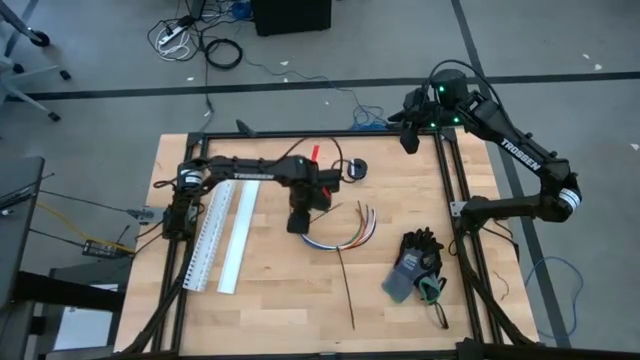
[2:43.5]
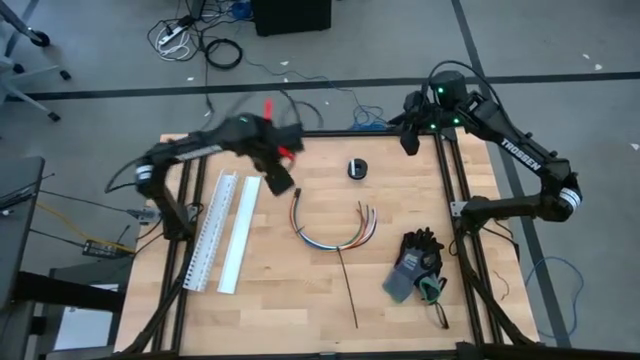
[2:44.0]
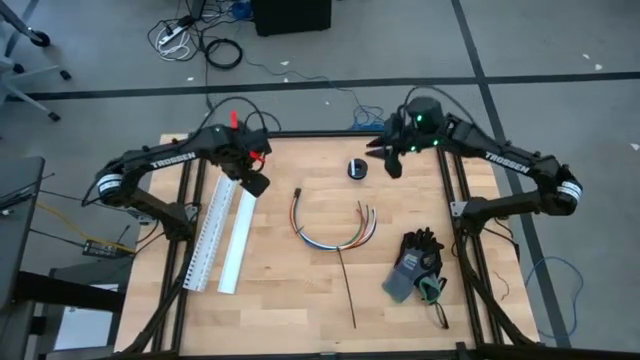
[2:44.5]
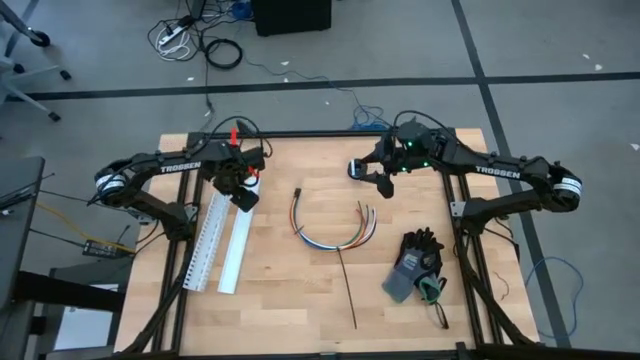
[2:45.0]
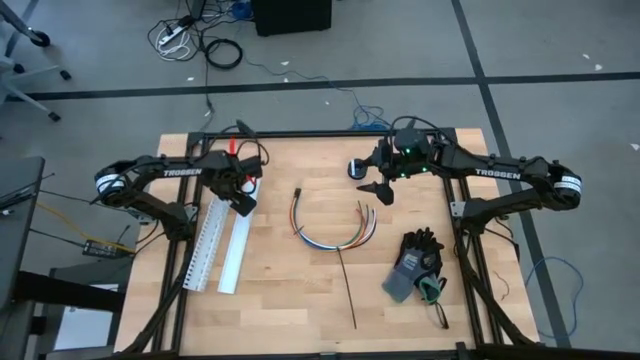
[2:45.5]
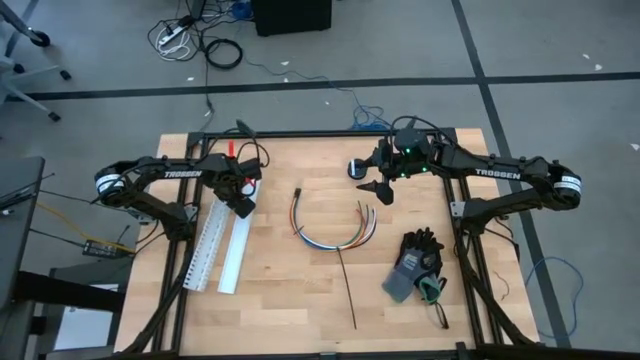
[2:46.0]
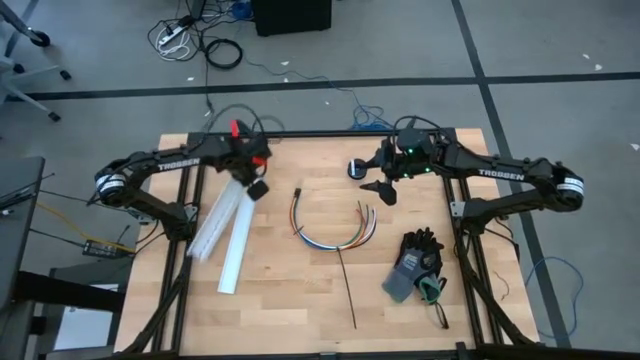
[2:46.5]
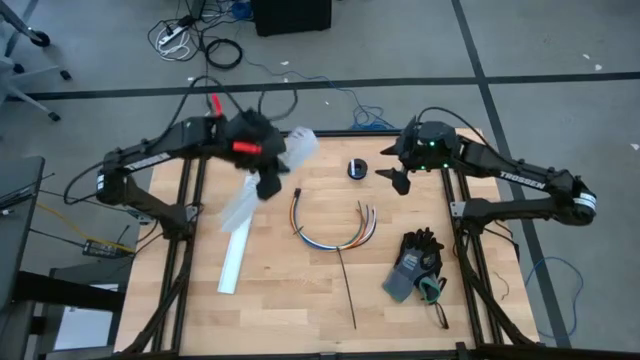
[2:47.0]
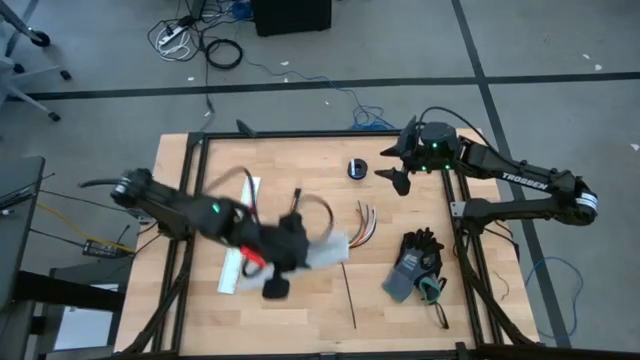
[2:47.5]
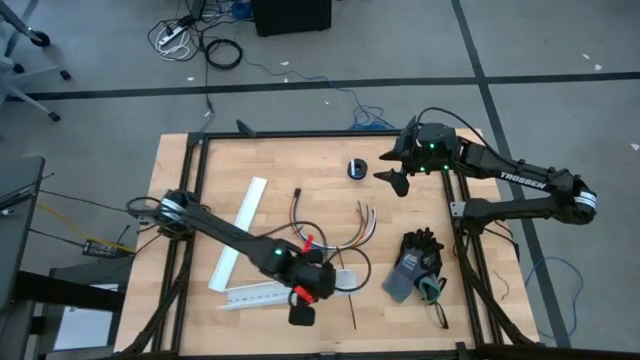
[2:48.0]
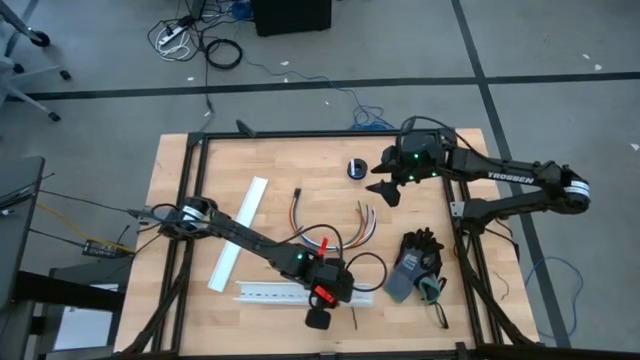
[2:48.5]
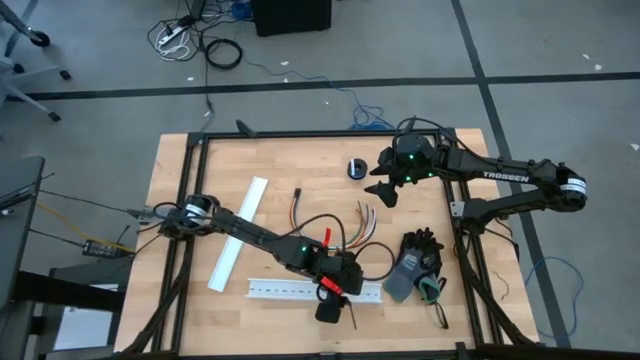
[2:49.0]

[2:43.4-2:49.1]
Task: Ziptie cables
Move the white cable duct to the bottom center of the table

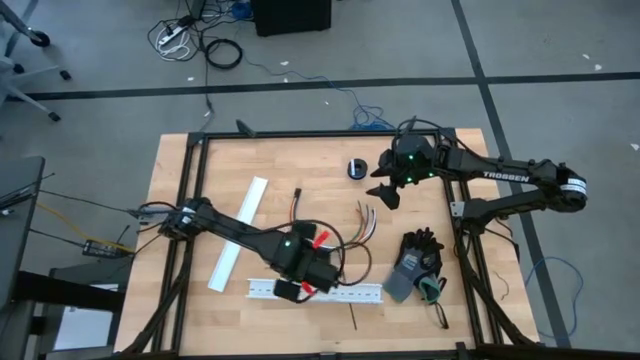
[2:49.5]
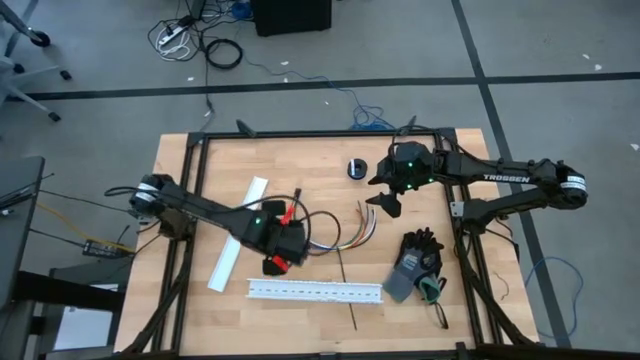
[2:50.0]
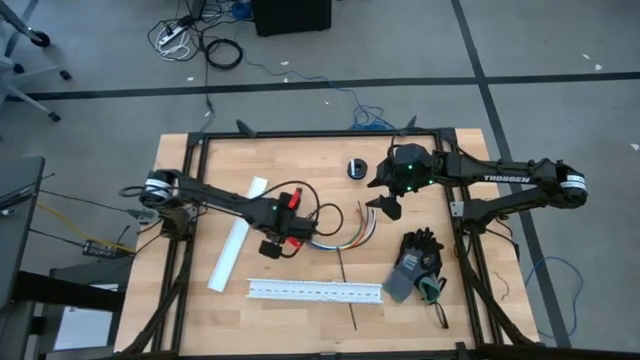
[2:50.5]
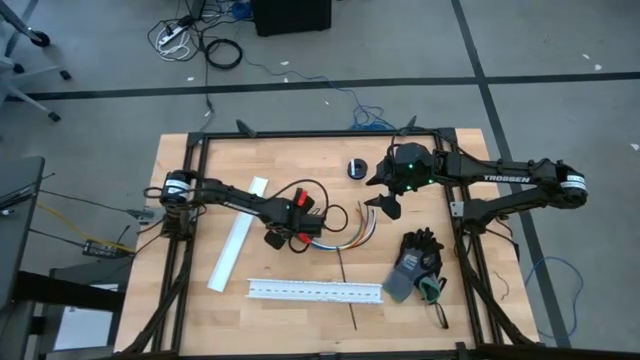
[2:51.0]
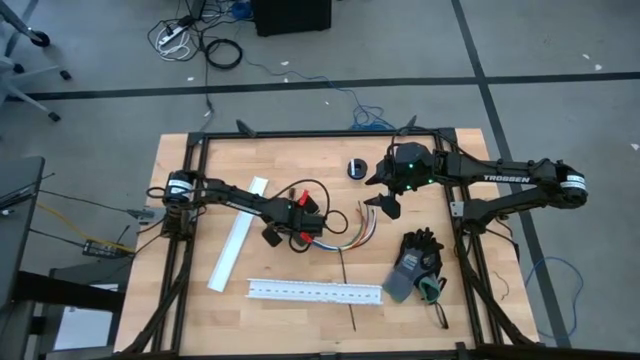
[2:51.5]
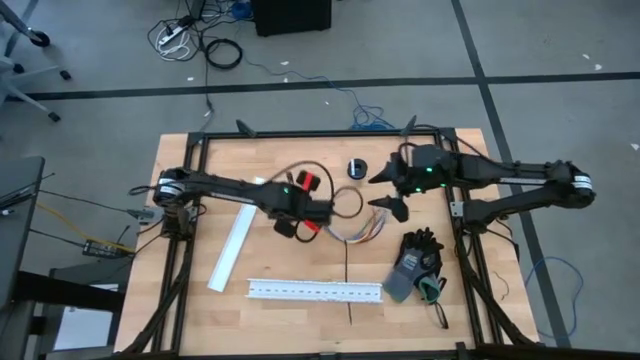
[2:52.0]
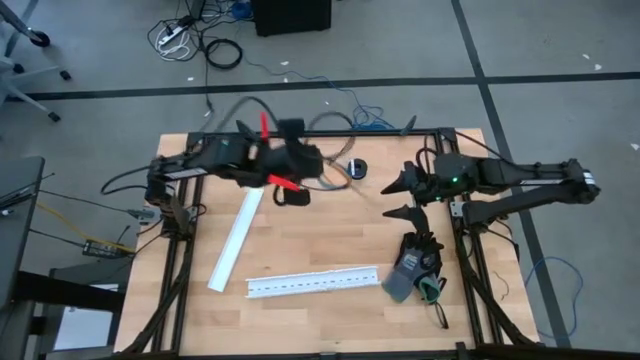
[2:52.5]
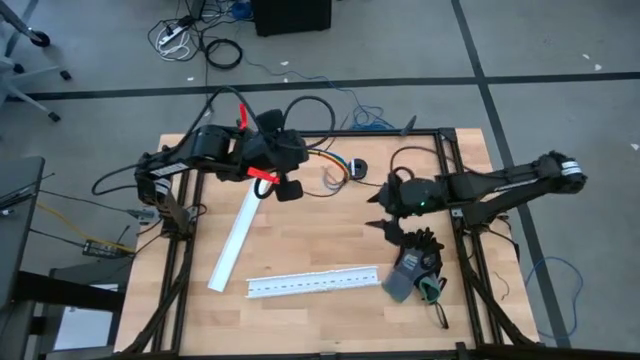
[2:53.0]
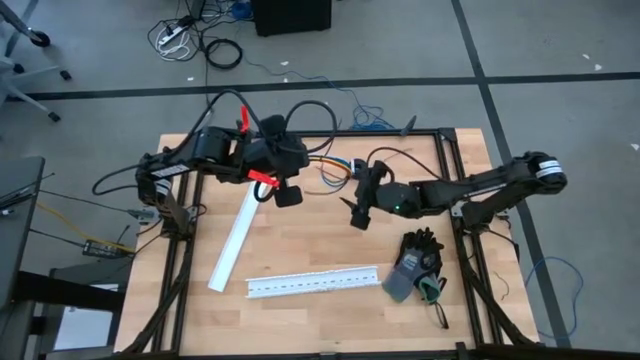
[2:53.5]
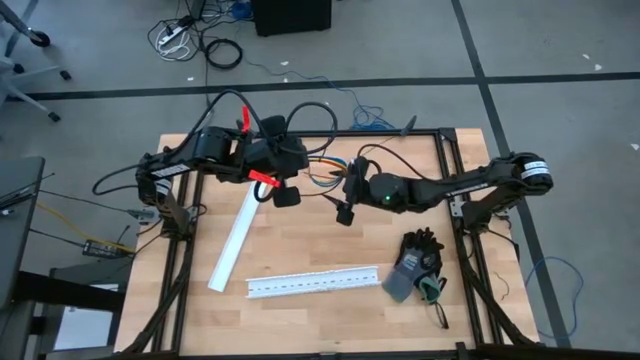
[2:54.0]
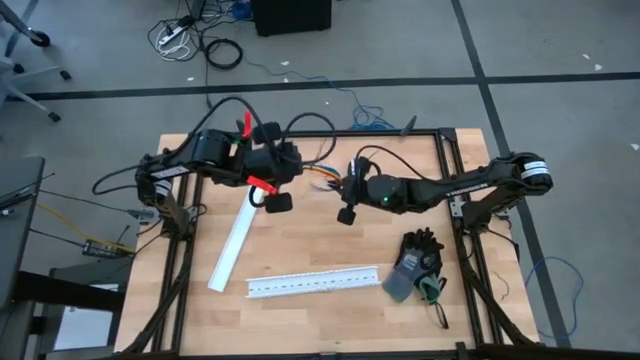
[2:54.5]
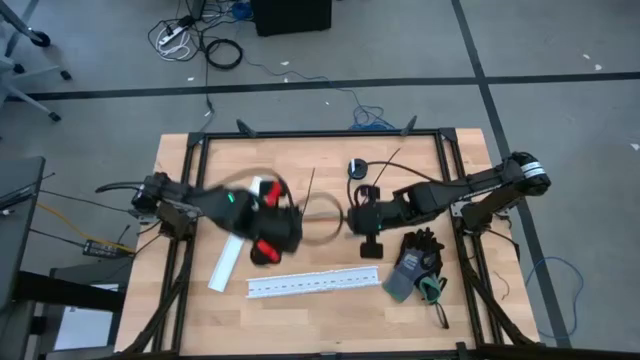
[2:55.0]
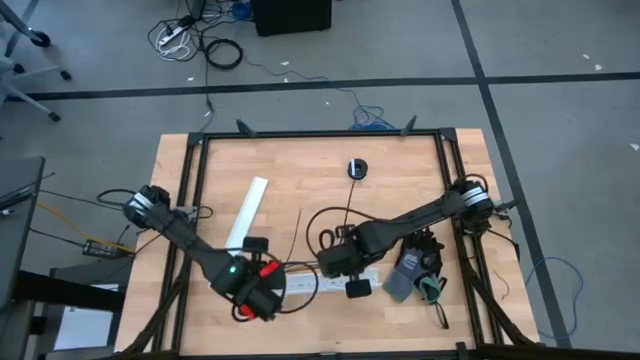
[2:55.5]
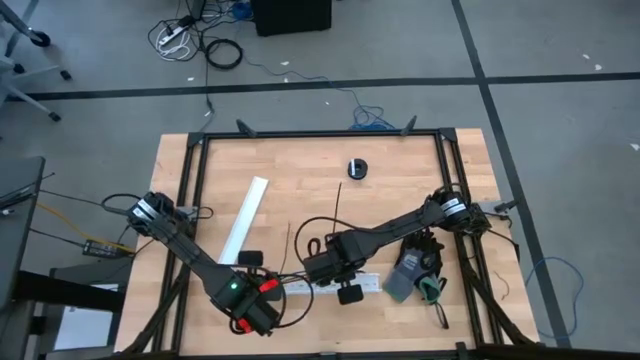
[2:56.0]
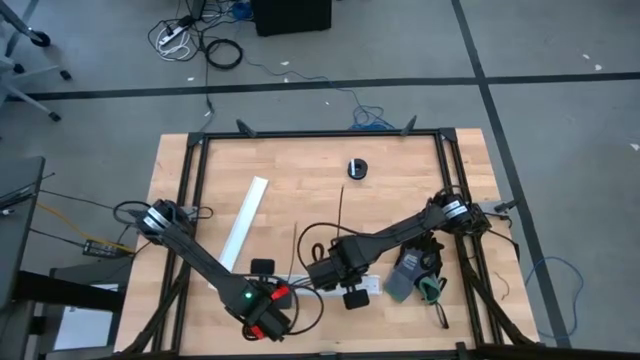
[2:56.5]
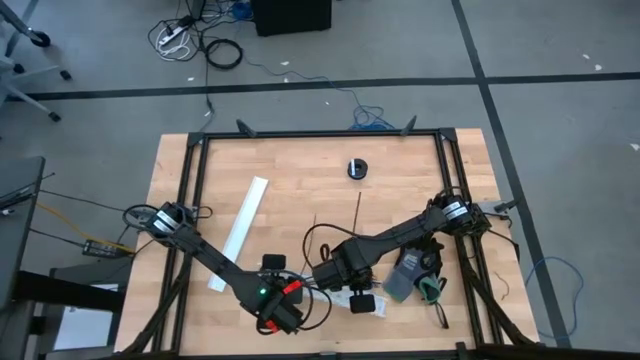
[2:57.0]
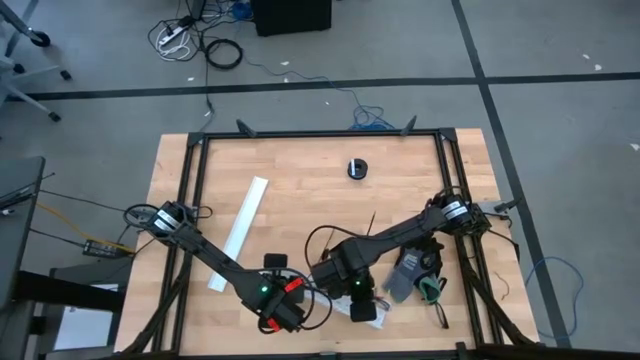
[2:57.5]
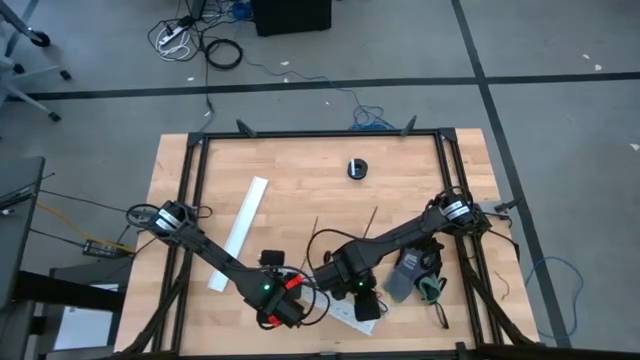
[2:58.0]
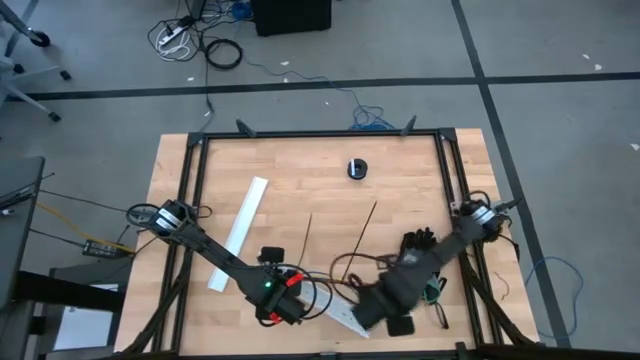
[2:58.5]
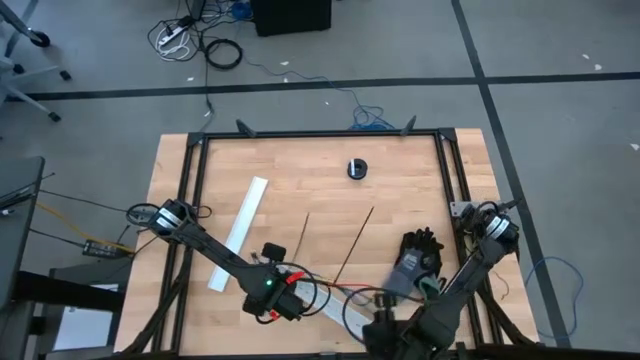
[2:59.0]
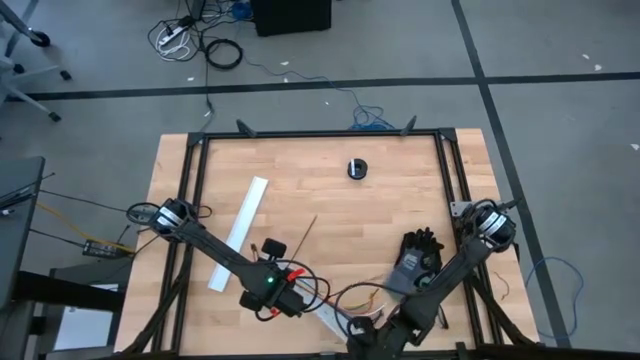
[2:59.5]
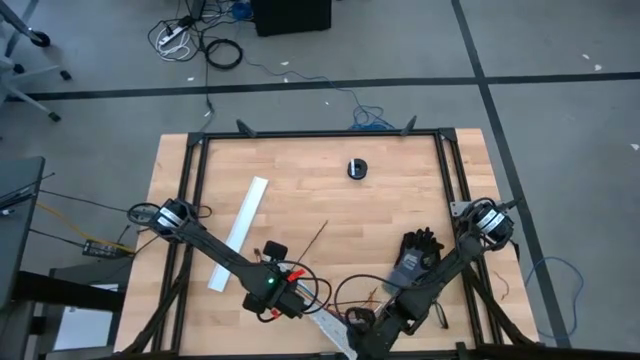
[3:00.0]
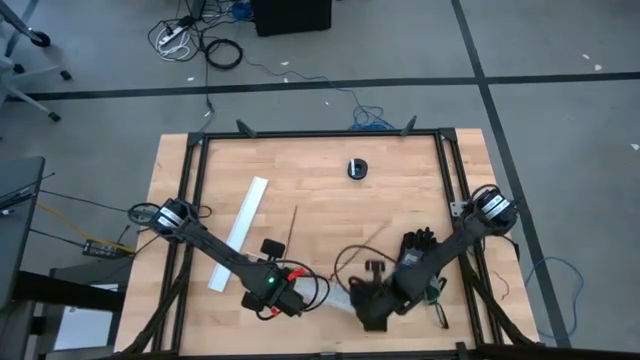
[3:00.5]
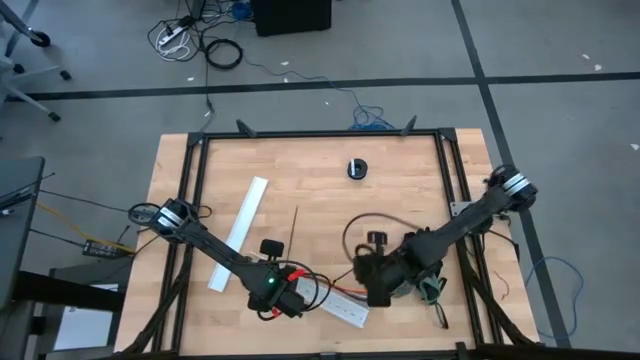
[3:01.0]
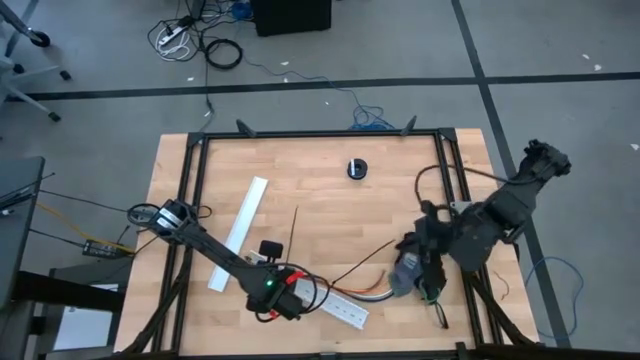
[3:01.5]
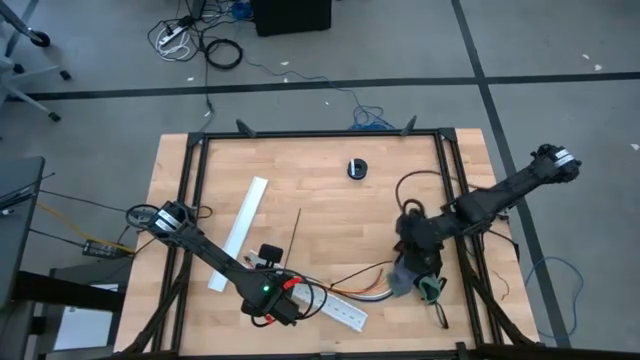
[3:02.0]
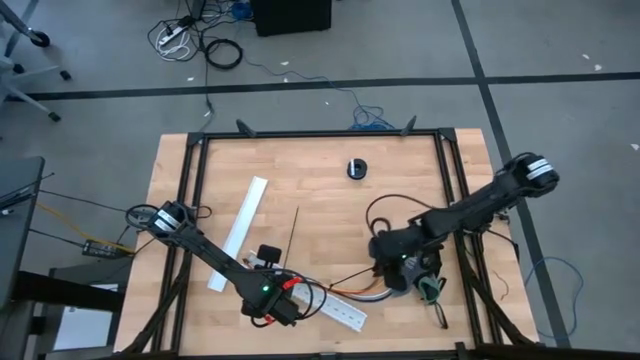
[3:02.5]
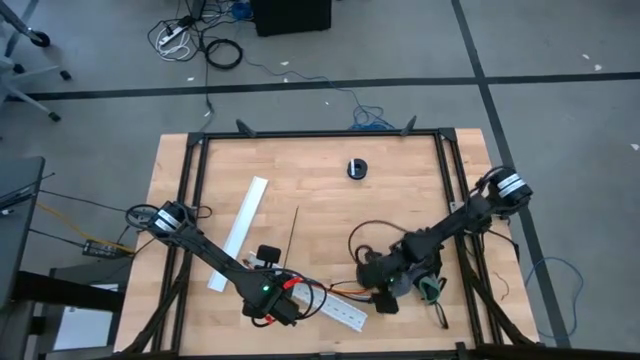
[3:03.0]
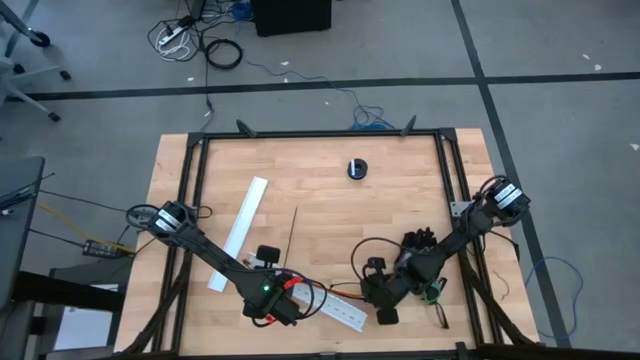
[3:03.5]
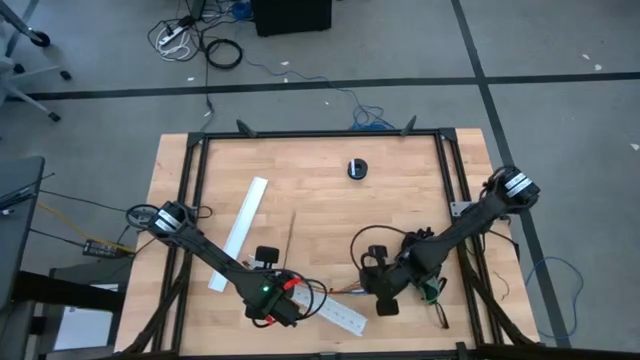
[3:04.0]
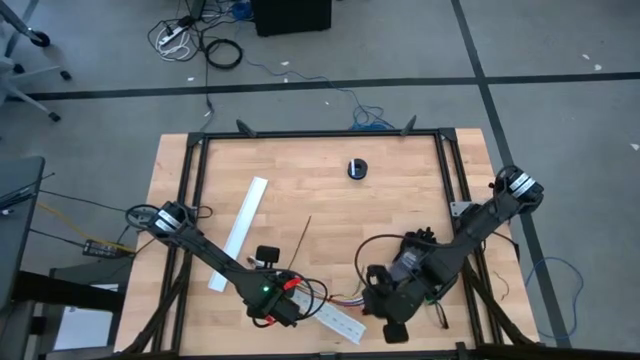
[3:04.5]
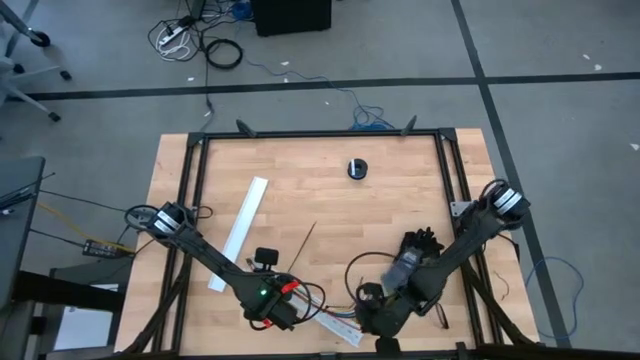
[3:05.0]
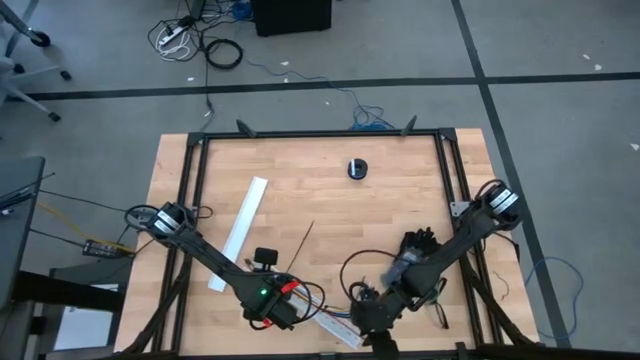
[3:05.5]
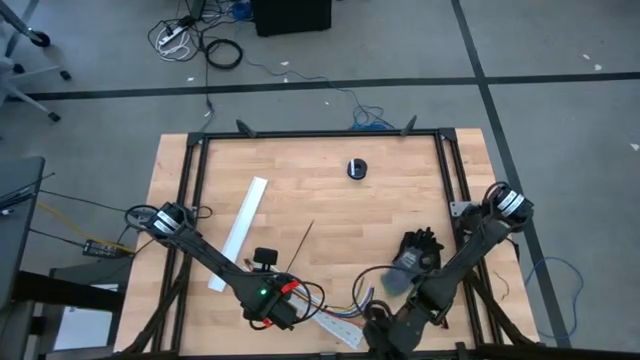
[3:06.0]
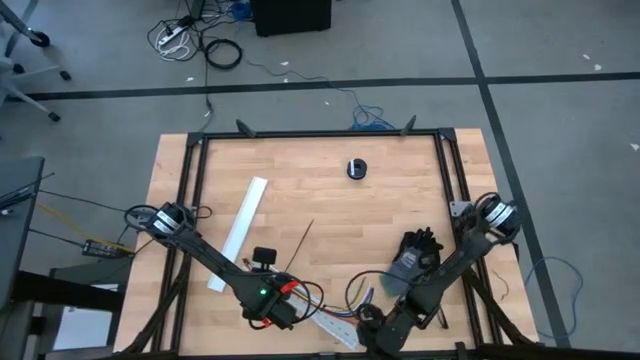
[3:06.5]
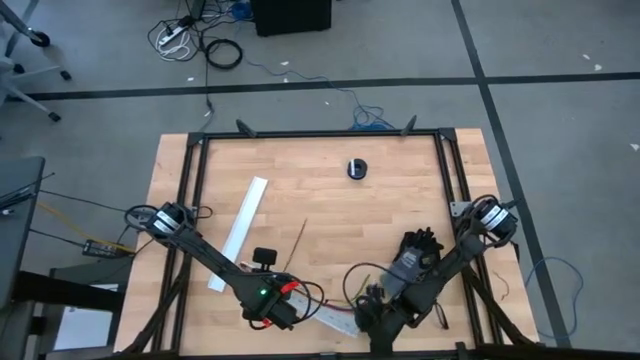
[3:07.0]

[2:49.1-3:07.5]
Put the cable wires in the white cable duct
